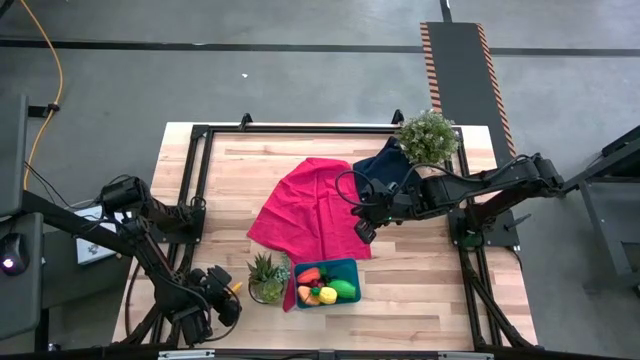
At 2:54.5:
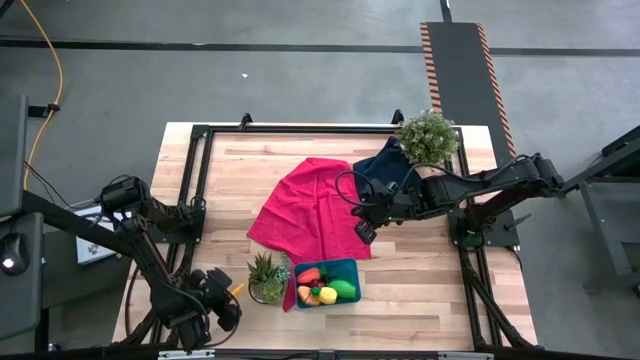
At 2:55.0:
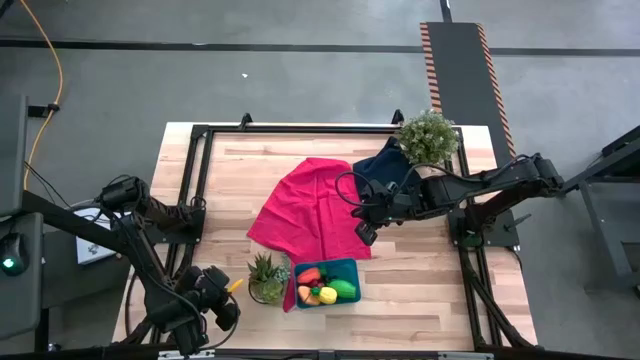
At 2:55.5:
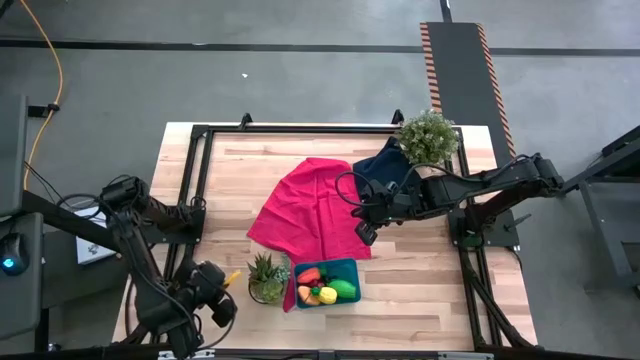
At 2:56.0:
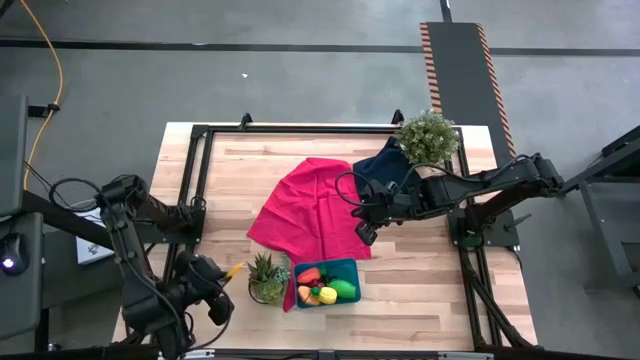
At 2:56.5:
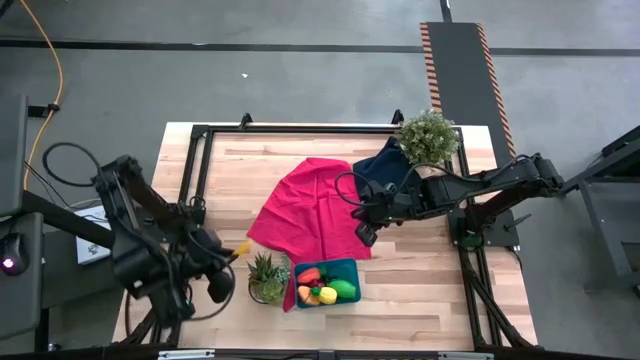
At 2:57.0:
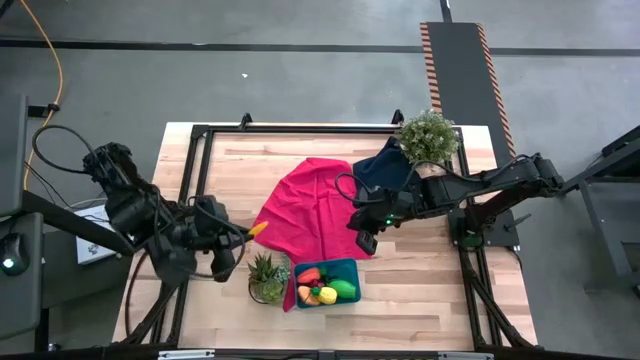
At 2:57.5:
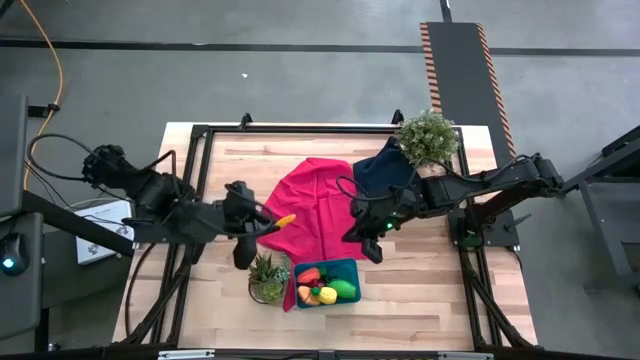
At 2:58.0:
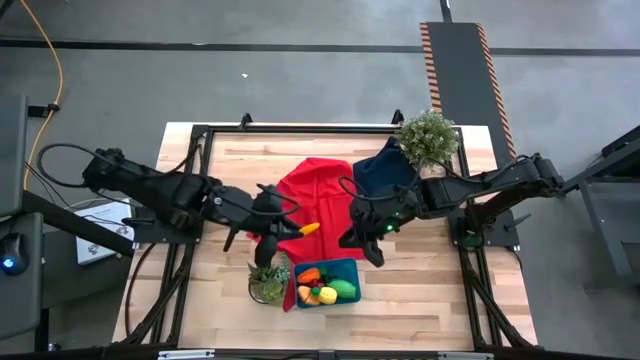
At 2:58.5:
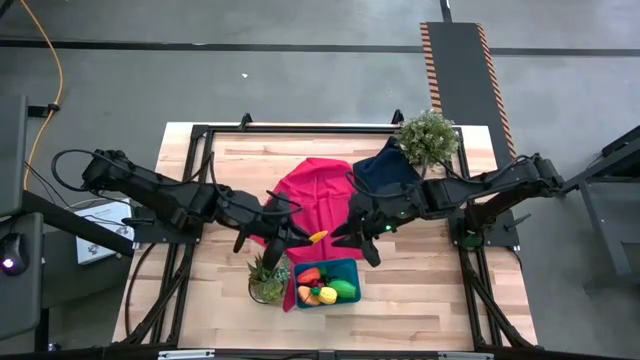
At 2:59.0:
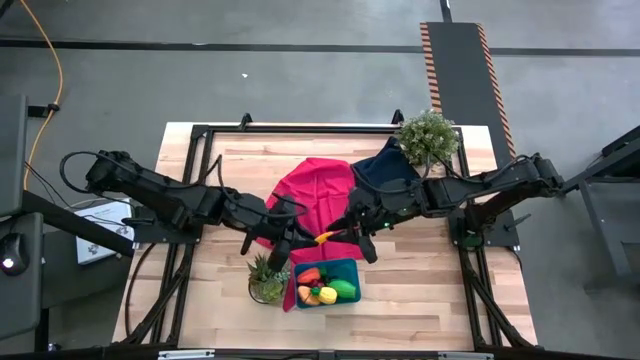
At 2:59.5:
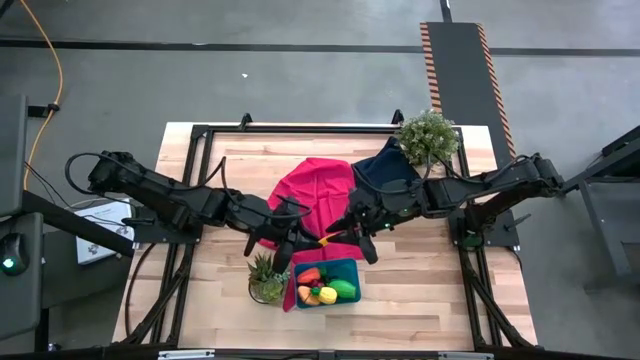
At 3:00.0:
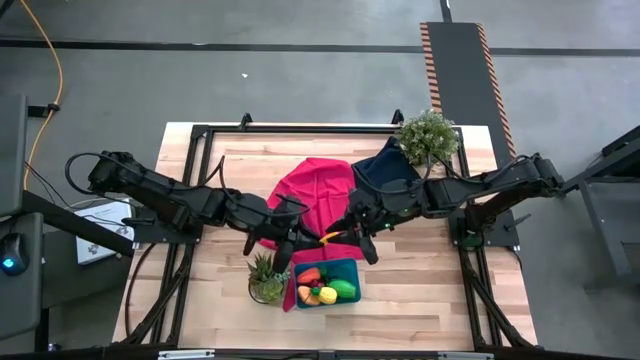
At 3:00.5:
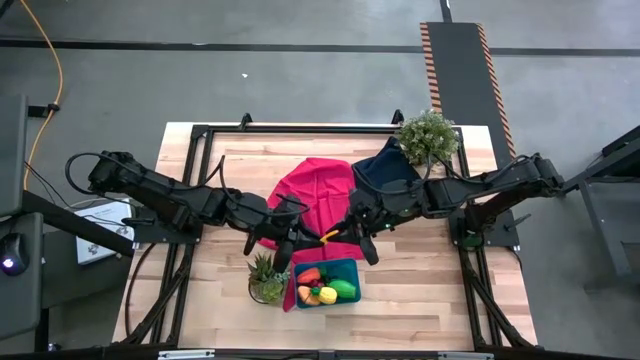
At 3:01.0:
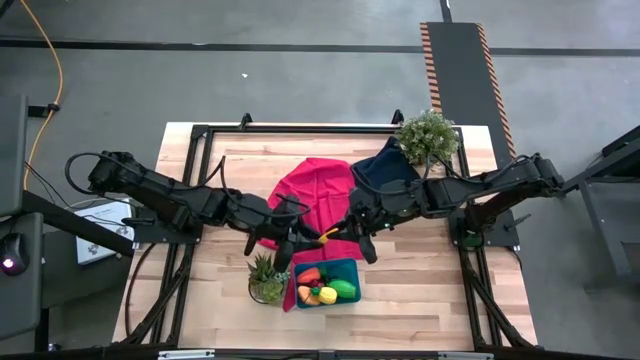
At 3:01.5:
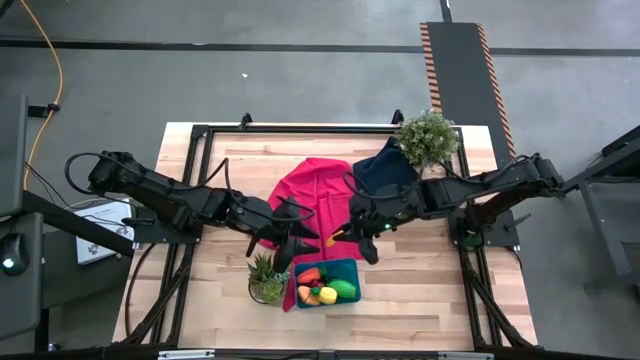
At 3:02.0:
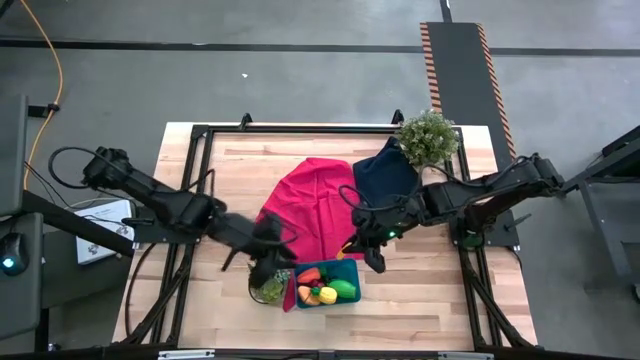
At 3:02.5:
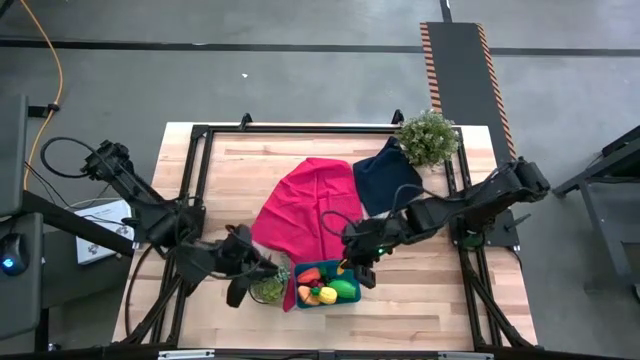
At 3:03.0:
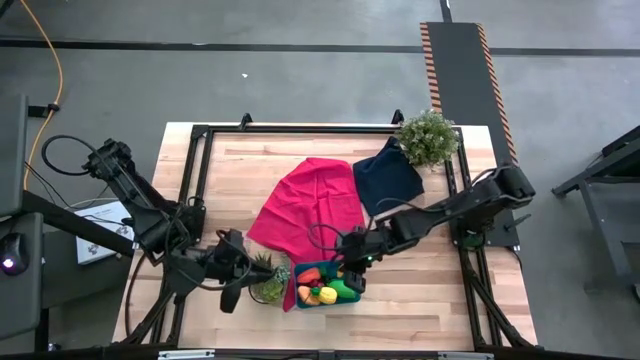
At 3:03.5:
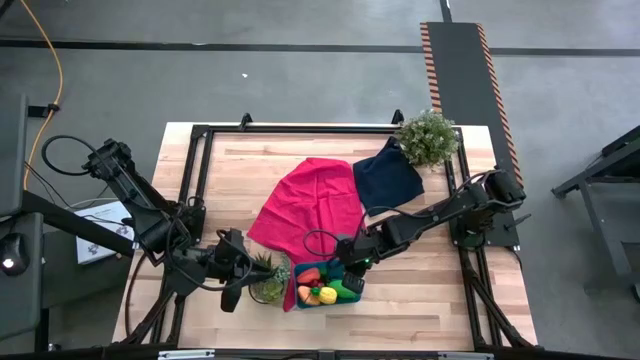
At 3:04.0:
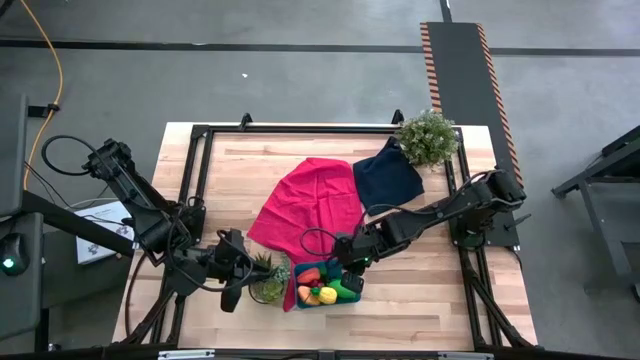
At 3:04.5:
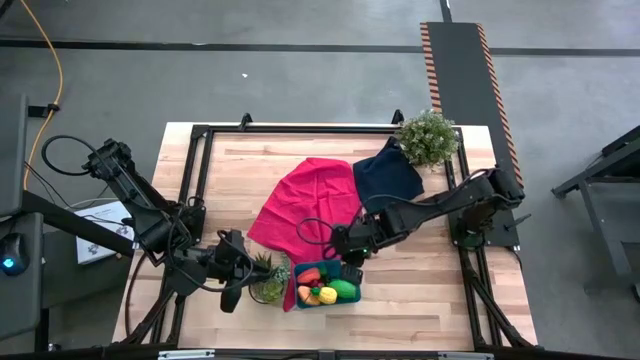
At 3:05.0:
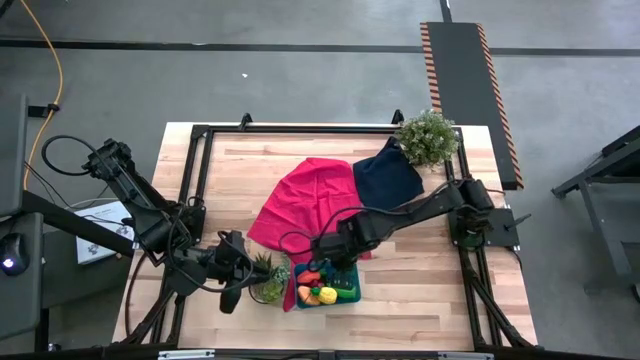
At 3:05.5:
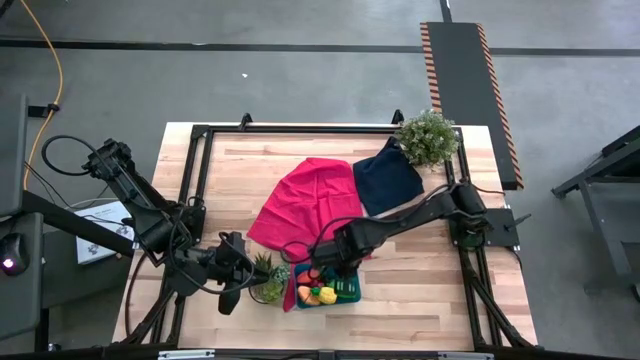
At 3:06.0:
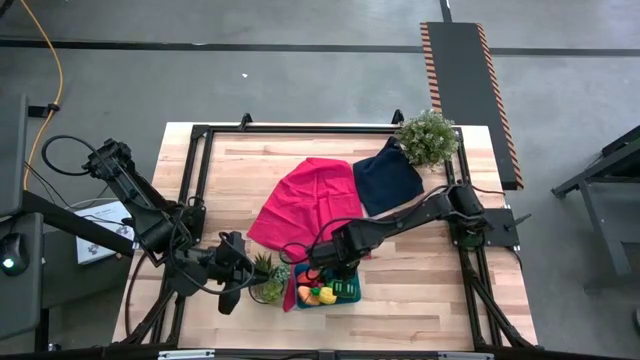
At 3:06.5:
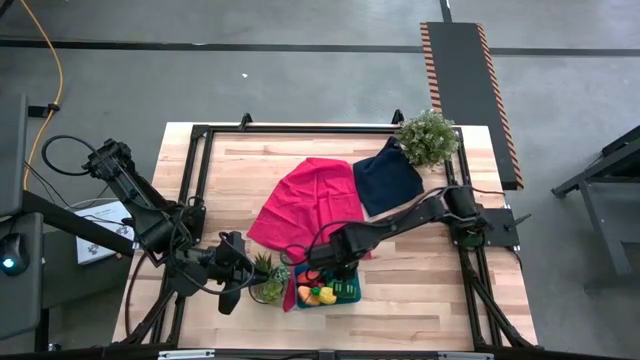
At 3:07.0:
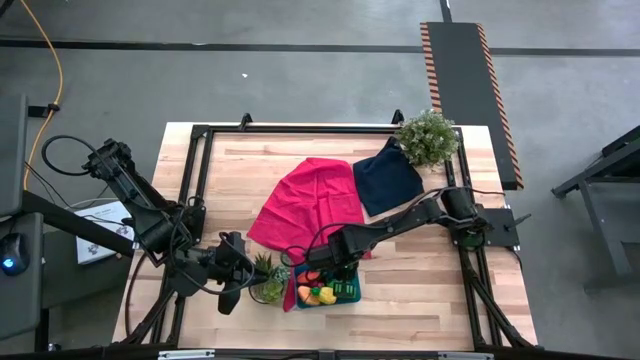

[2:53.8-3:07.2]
Task: Pick and placing Produce into tupperware
Put the yellow corn into the blue bin

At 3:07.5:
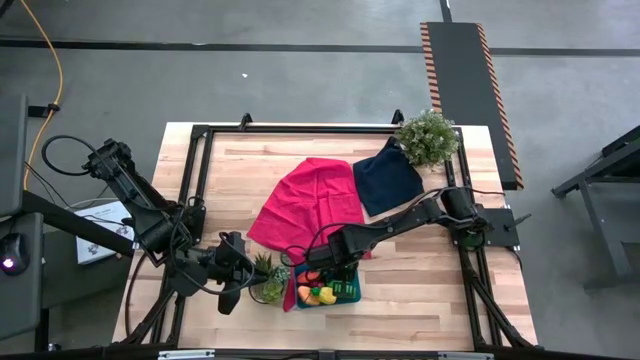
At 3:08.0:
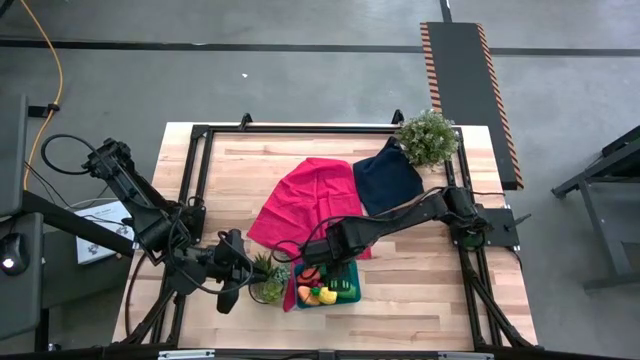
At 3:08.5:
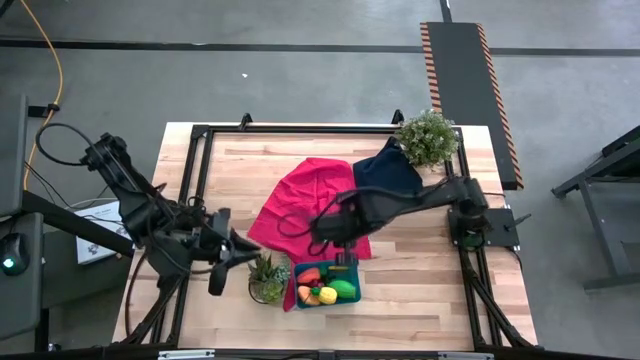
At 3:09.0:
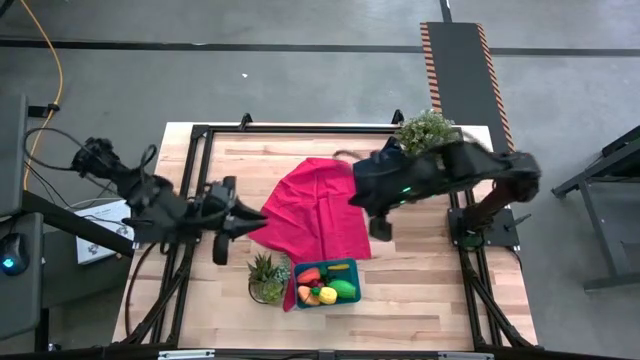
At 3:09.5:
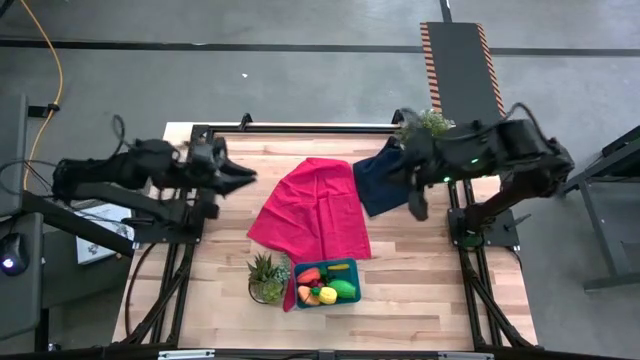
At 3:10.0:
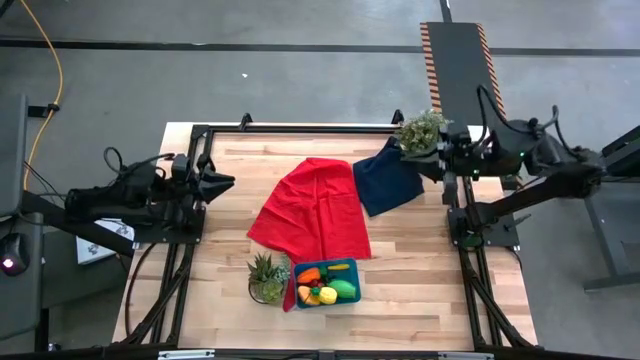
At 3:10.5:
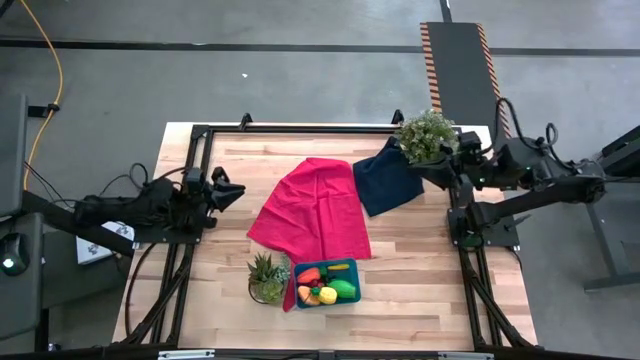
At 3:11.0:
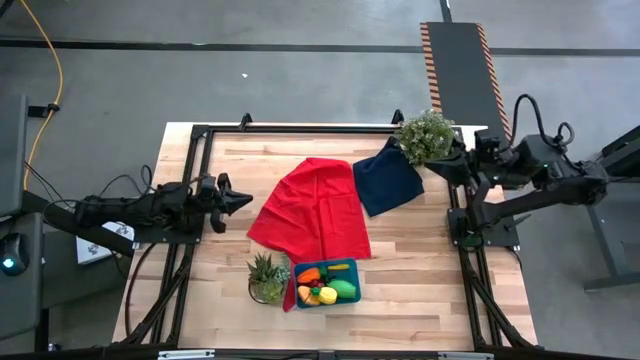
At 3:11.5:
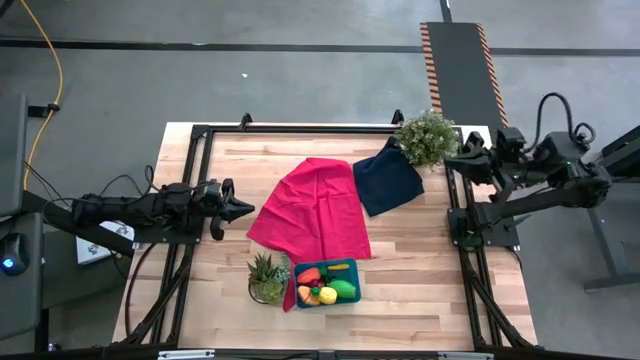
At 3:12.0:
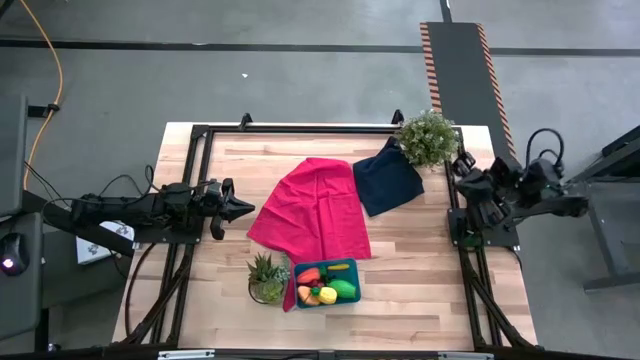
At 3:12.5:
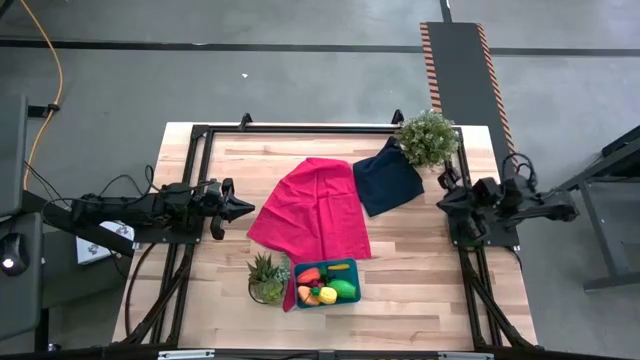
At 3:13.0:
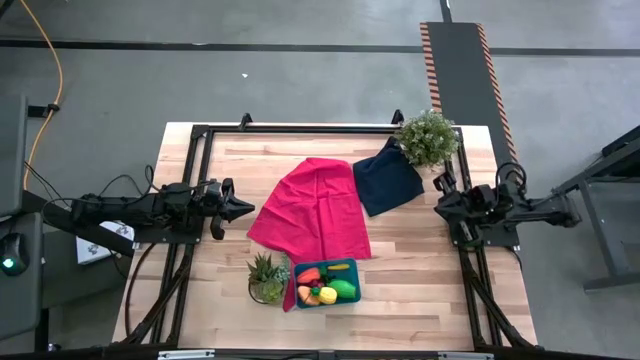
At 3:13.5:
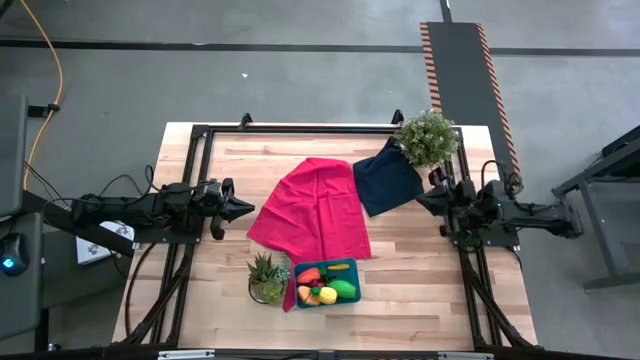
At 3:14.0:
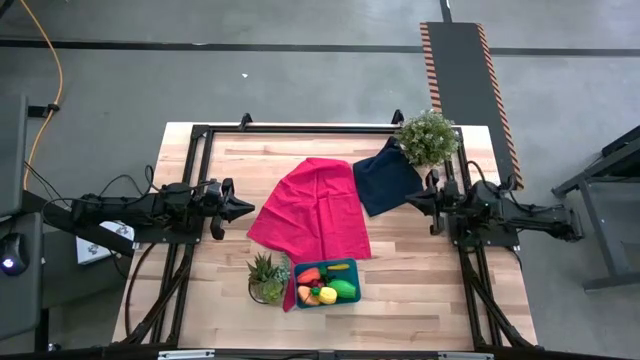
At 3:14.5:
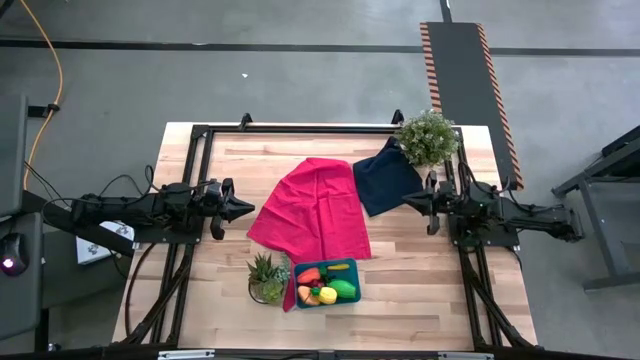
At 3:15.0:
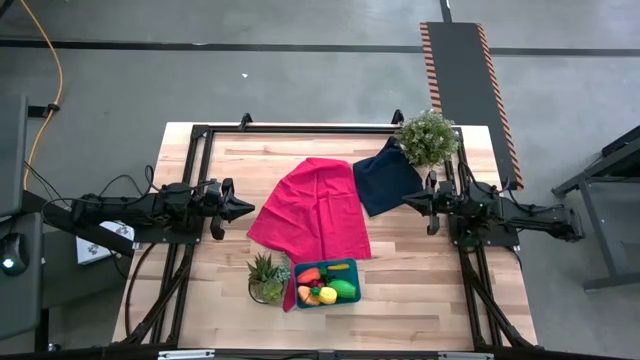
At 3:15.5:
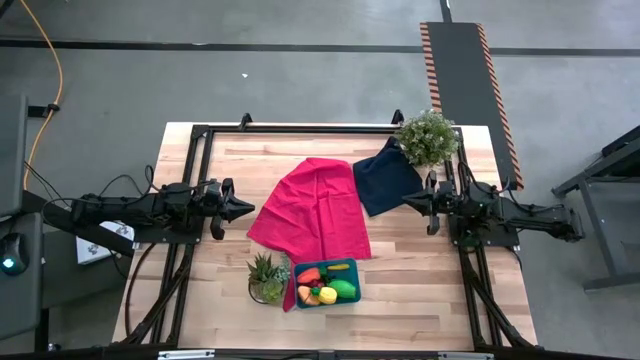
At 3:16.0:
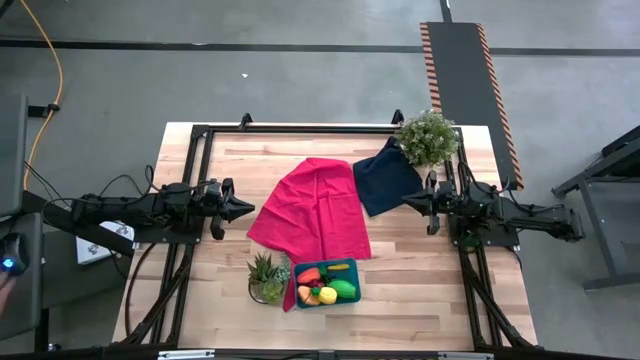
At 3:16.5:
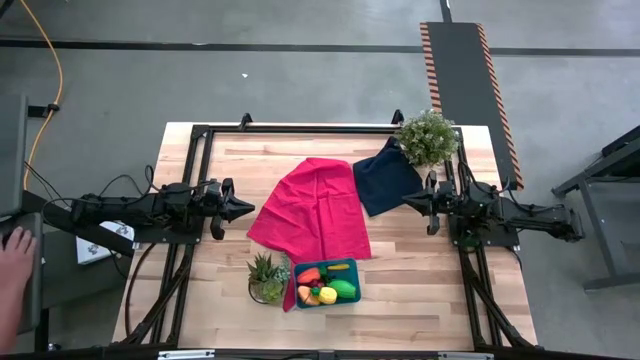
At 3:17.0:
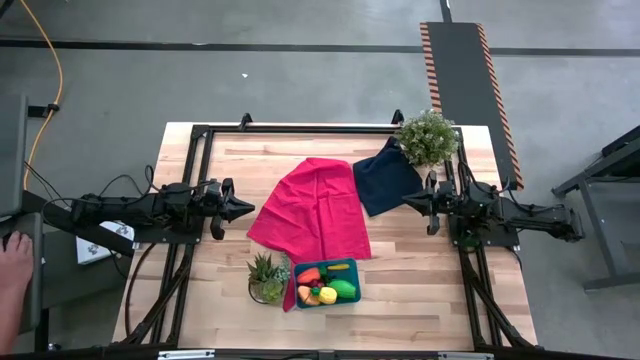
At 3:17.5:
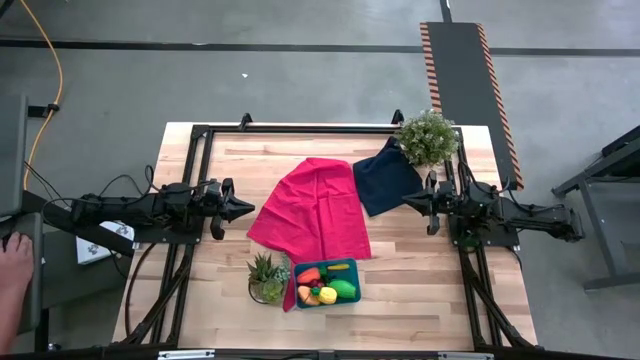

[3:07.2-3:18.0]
Return to Home Position
